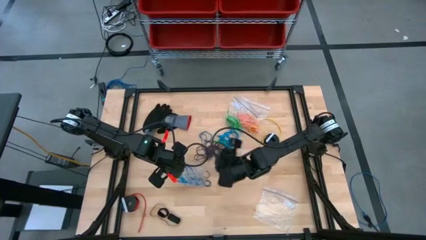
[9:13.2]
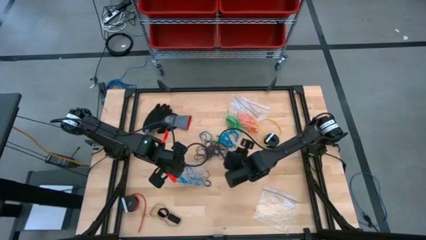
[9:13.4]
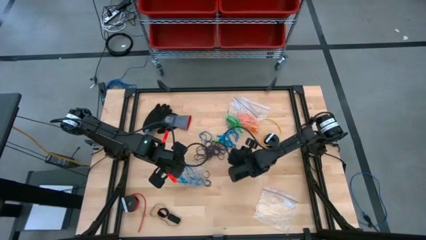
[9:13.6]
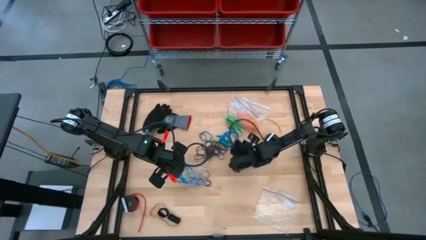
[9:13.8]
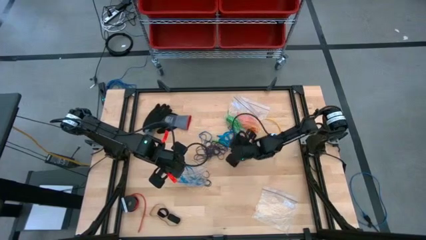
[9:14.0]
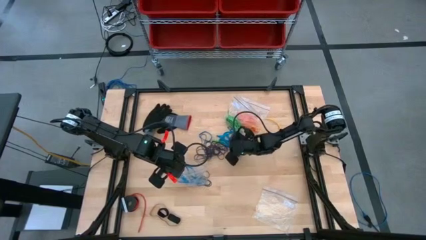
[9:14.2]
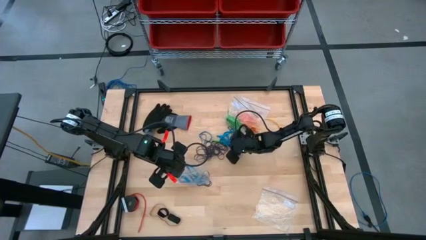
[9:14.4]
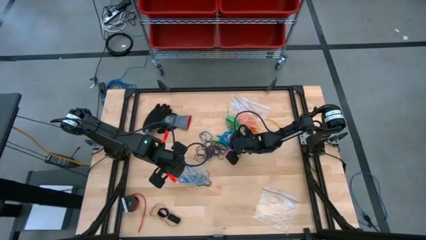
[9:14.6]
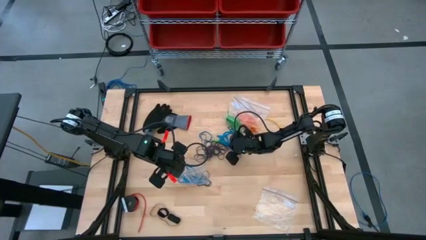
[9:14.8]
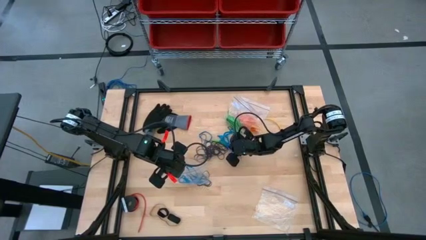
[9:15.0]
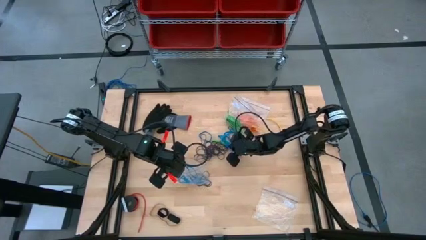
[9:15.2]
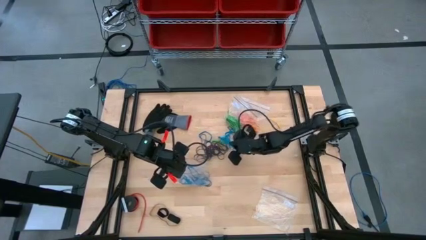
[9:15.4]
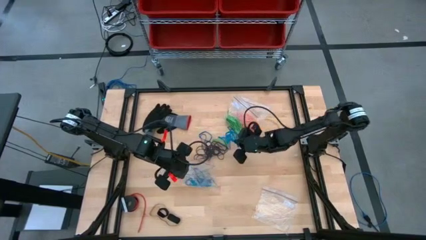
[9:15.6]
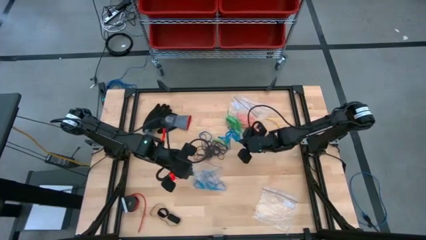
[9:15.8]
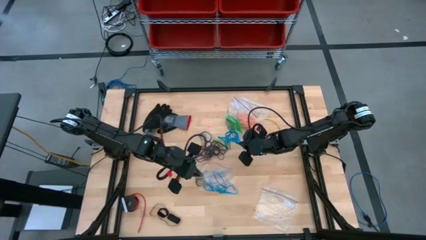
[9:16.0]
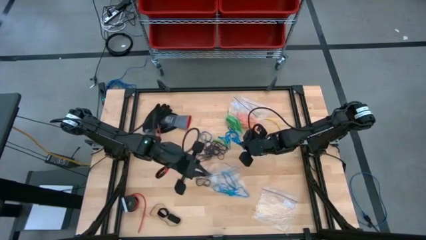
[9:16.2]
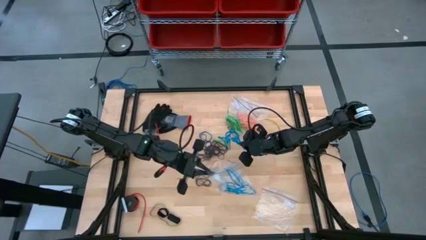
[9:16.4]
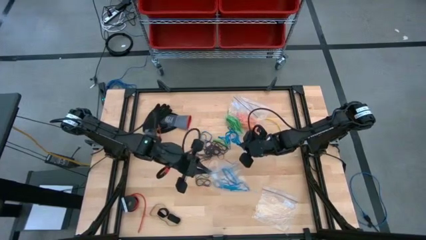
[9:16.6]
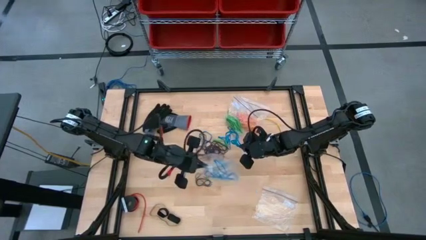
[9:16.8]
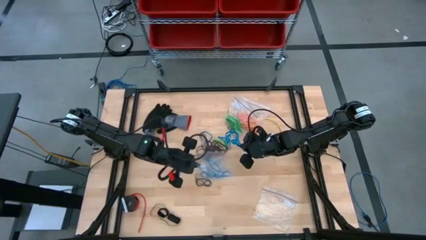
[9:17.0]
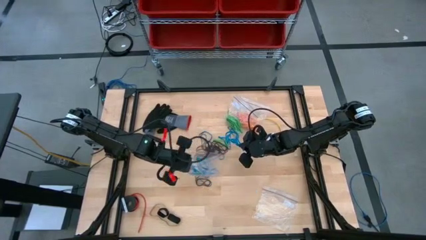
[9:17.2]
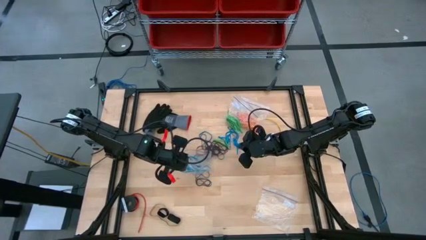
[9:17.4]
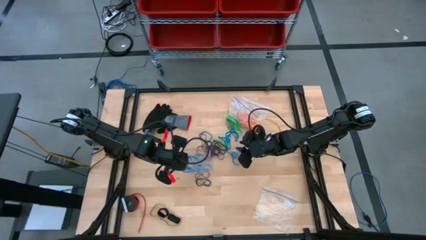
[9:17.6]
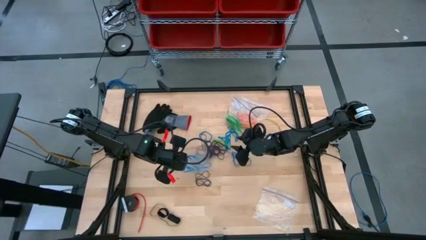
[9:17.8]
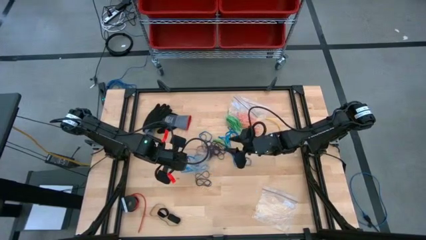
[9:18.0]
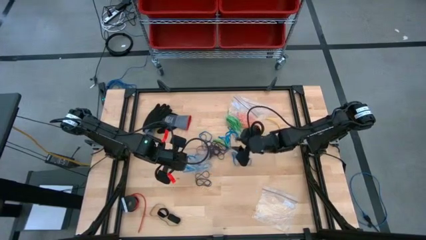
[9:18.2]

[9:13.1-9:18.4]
Task: Sort rubber bands
Put the blue rubber band into the transparent zip bag

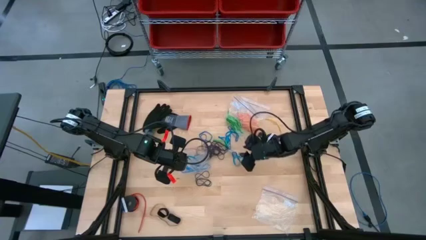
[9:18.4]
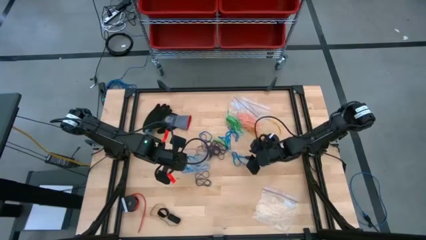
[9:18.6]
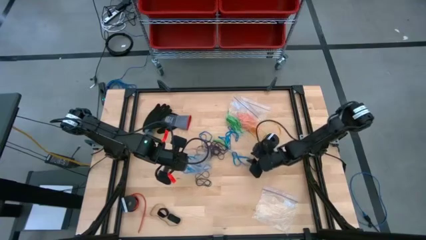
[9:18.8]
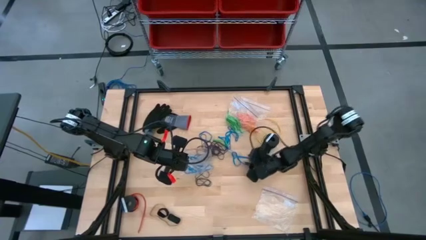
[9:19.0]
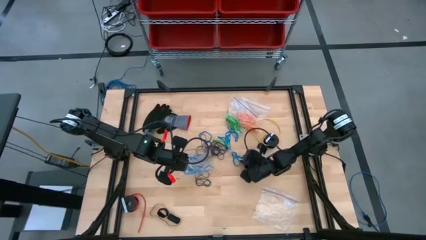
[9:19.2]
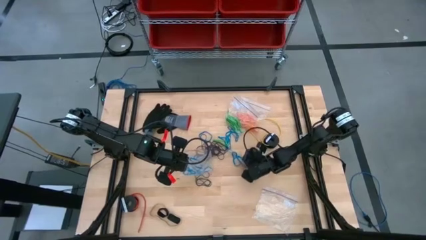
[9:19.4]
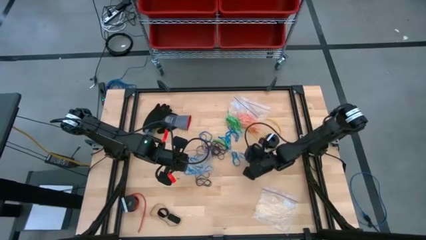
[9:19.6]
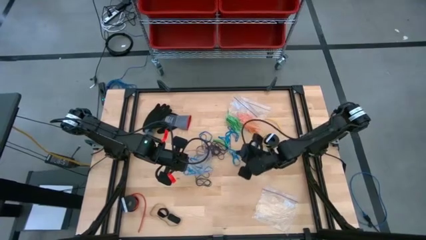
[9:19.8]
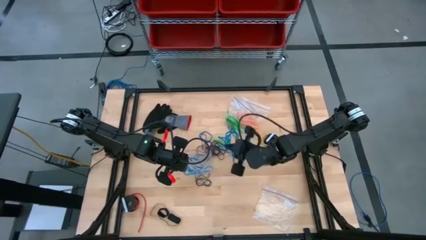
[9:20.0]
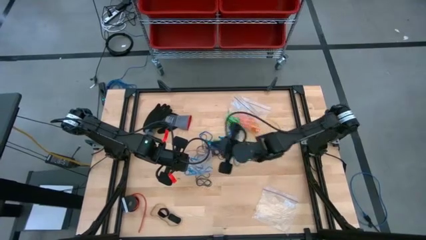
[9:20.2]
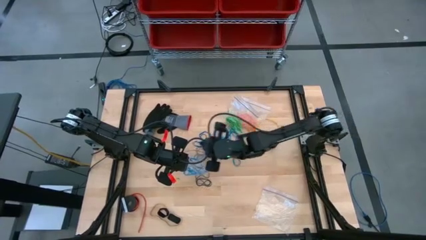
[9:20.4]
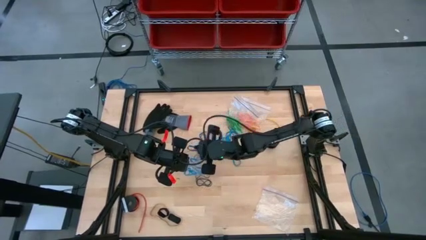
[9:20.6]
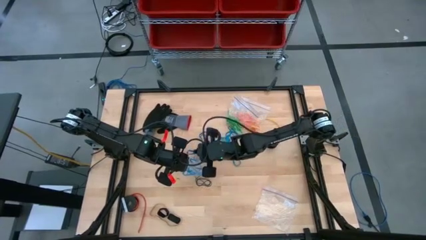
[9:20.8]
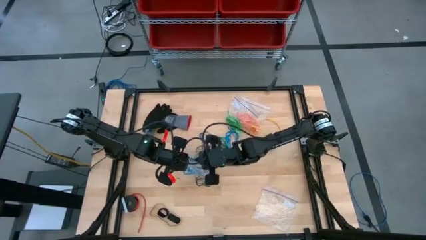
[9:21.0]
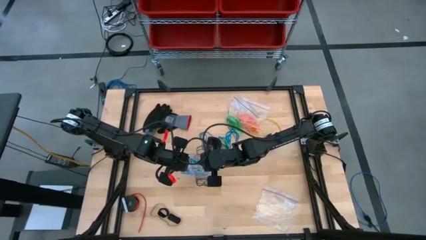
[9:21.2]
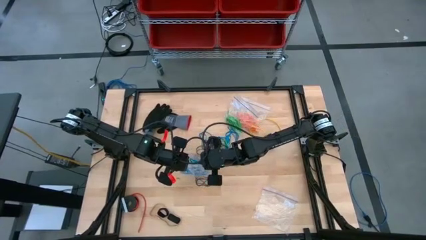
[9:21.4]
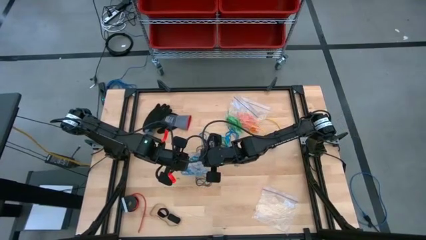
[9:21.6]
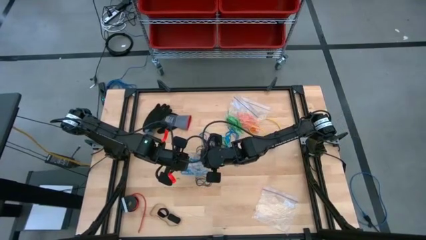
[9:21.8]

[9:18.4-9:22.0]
Put the blue rubber band into the transparent zip bag

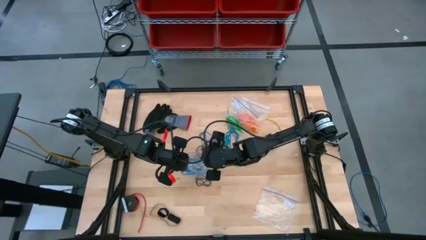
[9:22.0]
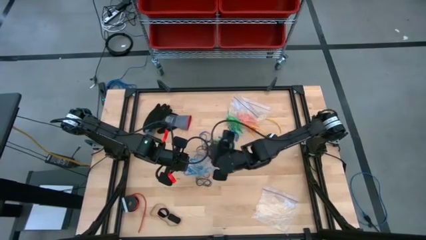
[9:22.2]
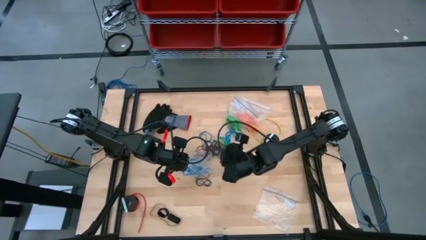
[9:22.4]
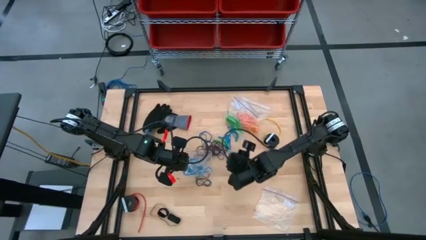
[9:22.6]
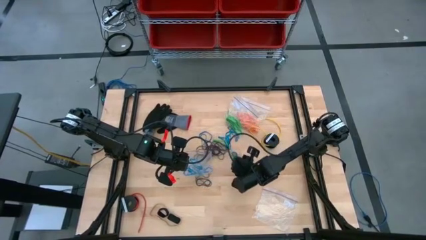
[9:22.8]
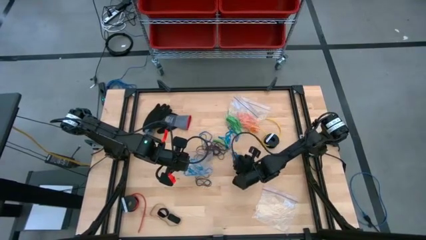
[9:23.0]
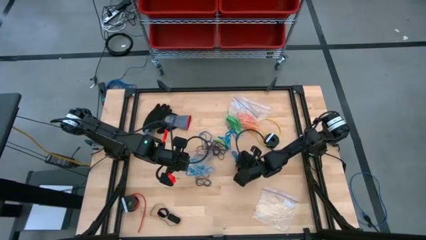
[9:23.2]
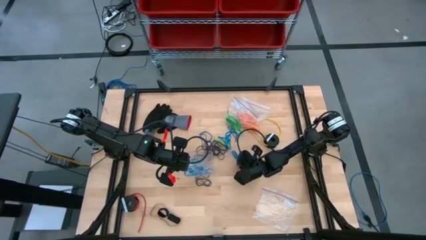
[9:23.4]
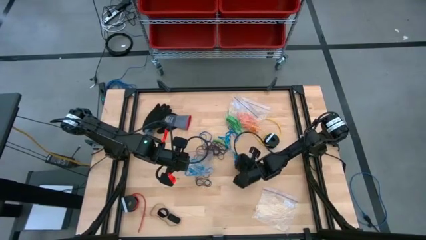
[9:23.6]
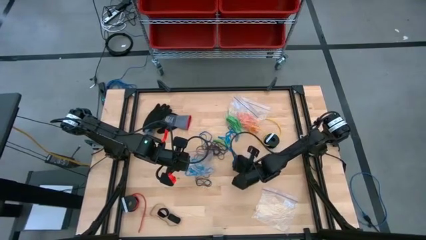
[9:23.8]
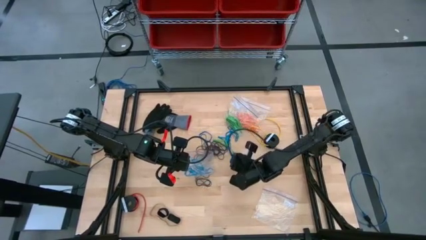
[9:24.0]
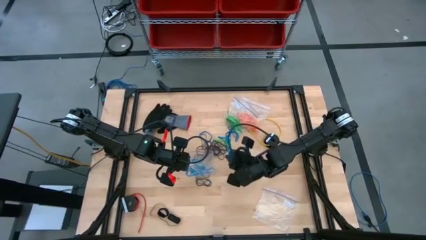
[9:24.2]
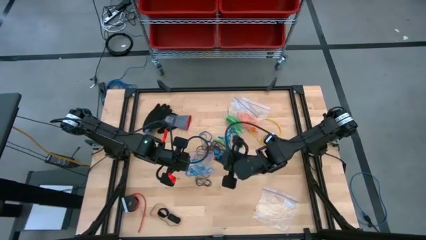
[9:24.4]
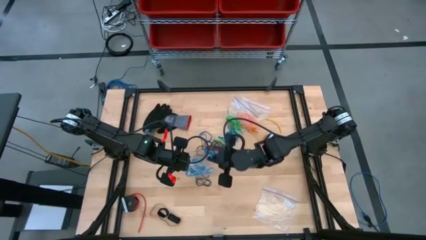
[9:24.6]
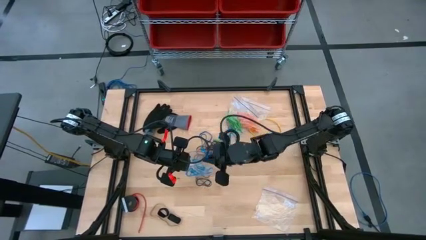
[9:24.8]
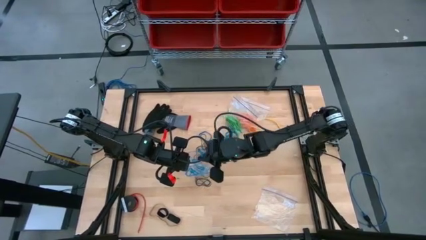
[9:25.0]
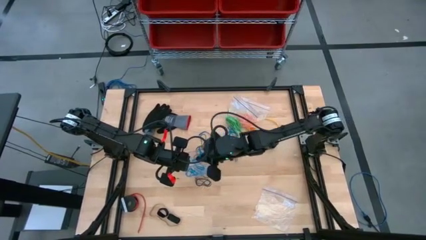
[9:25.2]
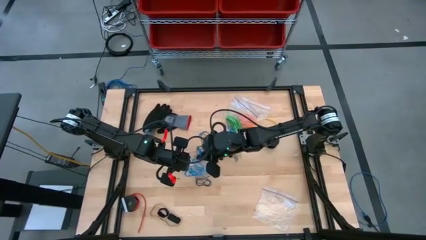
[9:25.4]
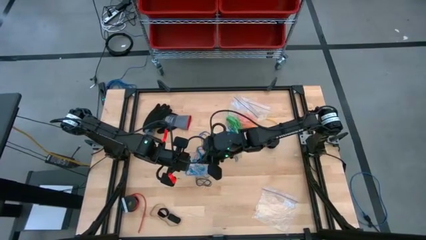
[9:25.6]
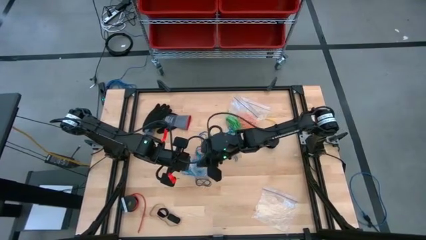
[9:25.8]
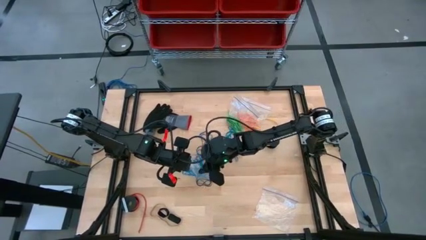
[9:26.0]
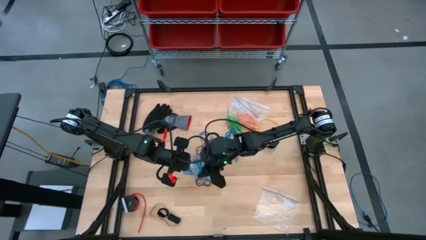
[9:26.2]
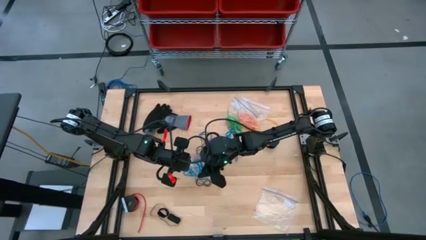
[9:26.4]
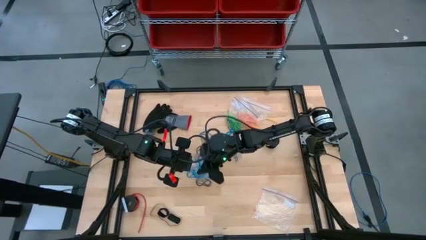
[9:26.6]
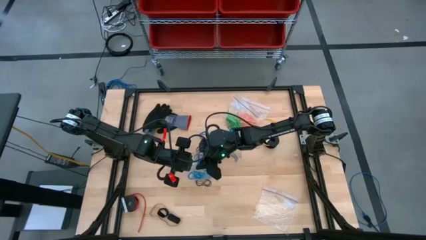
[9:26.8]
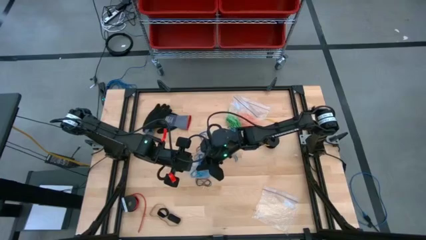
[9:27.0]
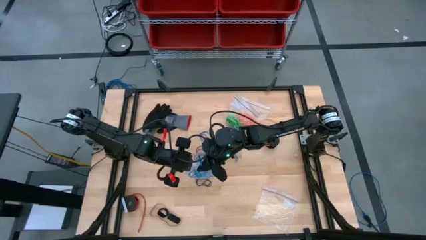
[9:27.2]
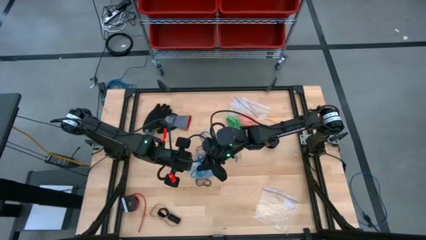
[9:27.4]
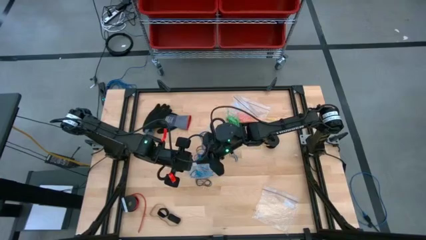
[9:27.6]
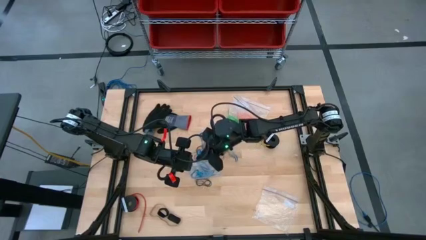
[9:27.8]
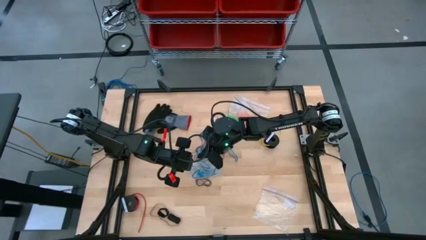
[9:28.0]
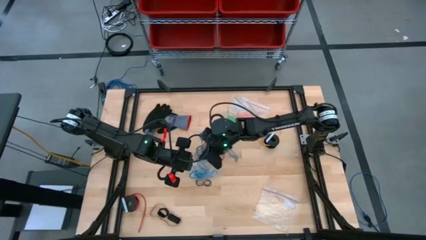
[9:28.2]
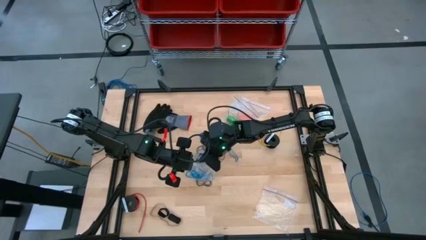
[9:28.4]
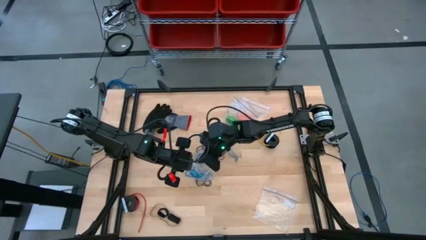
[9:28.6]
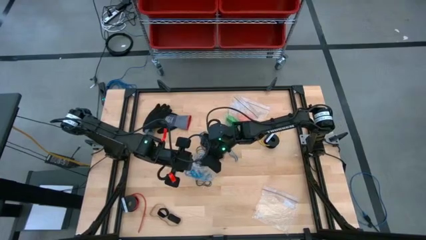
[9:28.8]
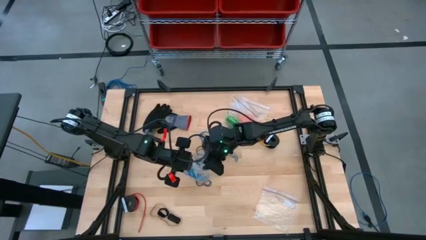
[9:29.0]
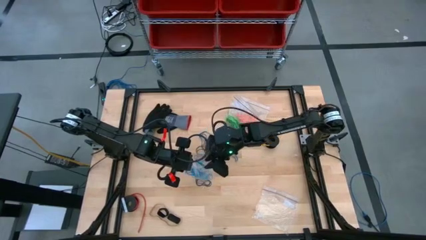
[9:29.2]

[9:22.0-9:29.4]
Put the blue rubber band into the transparent zip bag
